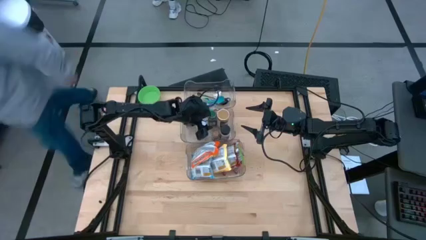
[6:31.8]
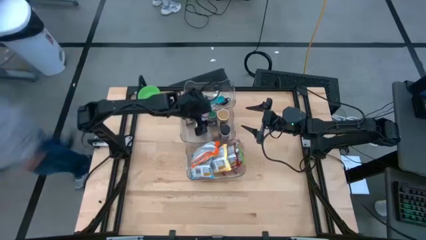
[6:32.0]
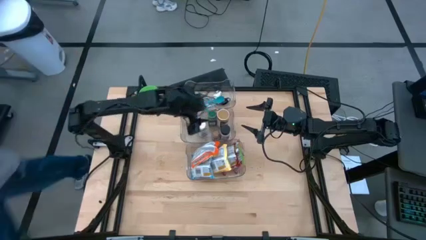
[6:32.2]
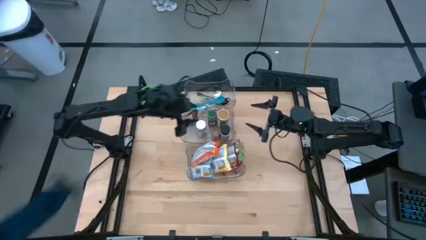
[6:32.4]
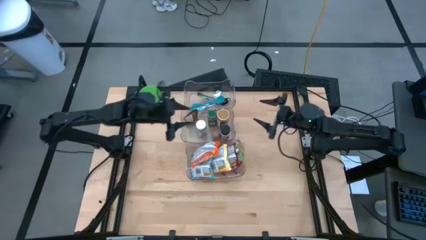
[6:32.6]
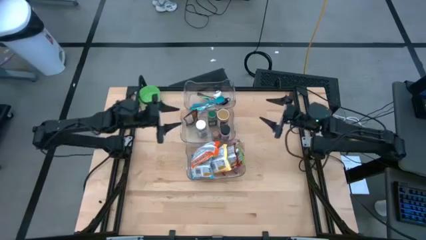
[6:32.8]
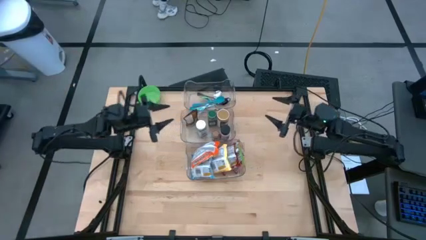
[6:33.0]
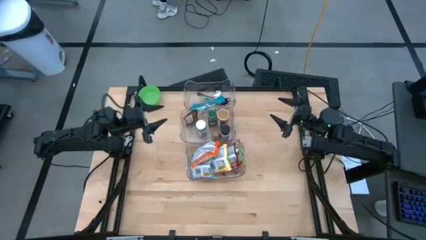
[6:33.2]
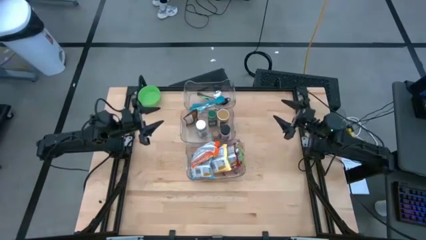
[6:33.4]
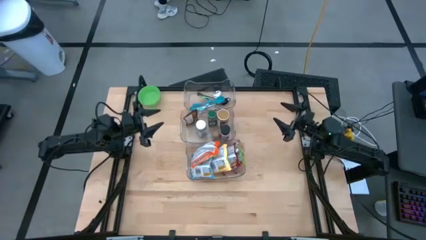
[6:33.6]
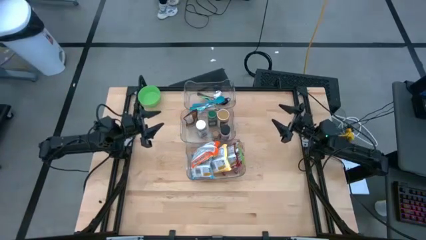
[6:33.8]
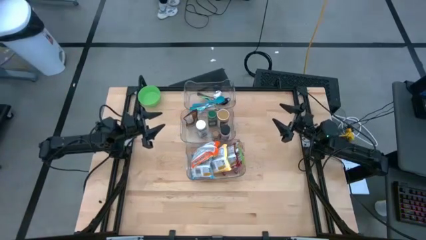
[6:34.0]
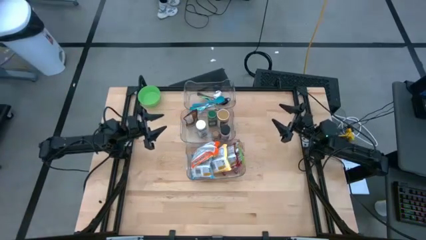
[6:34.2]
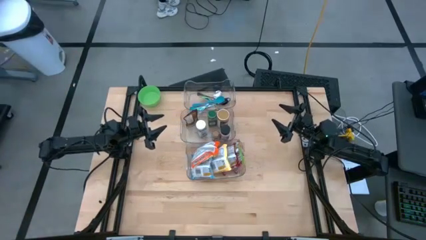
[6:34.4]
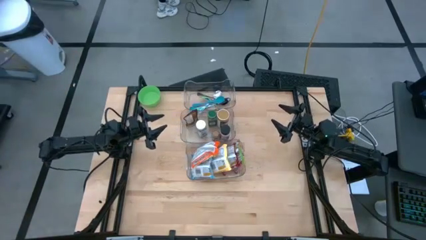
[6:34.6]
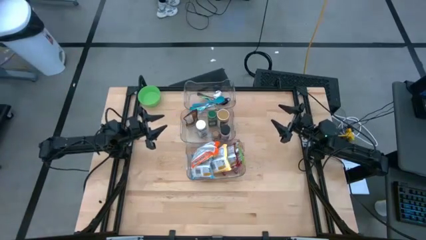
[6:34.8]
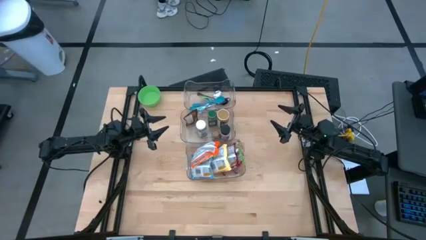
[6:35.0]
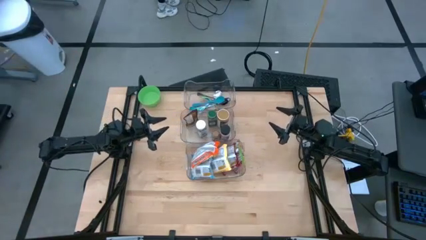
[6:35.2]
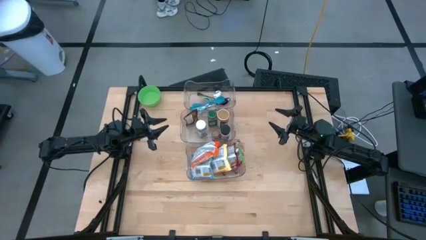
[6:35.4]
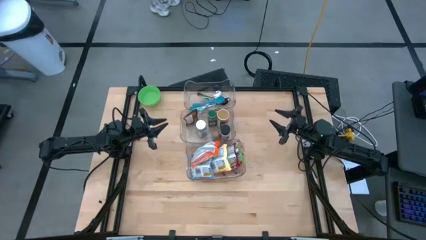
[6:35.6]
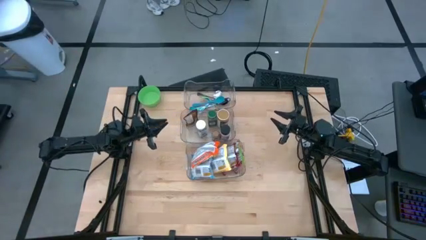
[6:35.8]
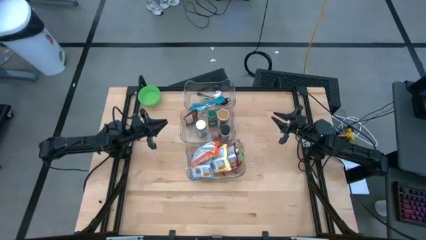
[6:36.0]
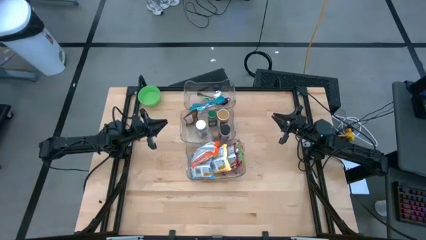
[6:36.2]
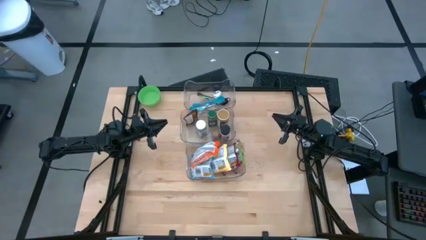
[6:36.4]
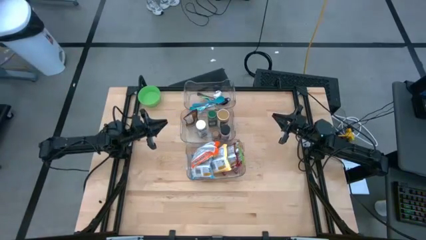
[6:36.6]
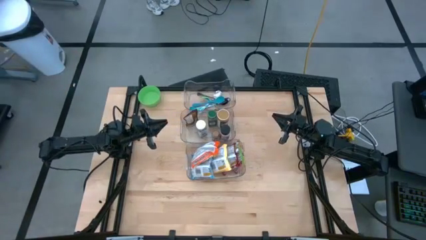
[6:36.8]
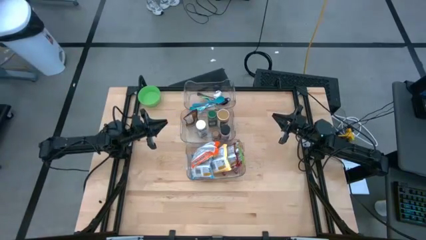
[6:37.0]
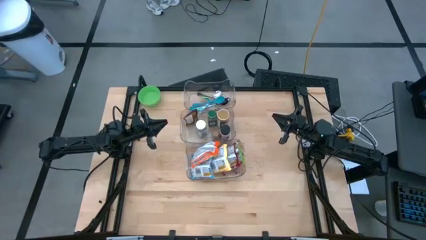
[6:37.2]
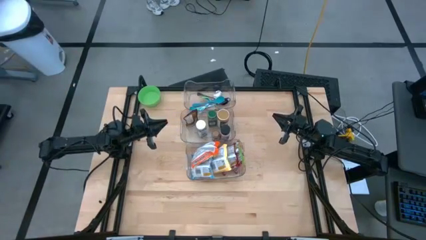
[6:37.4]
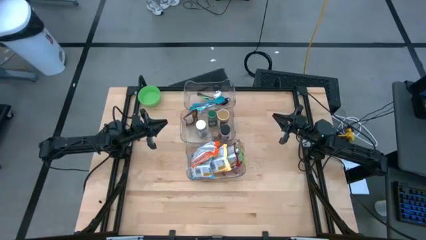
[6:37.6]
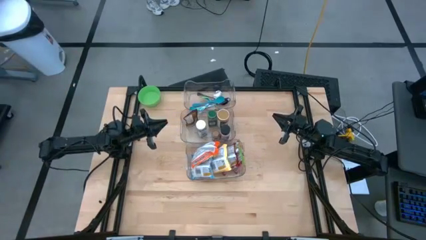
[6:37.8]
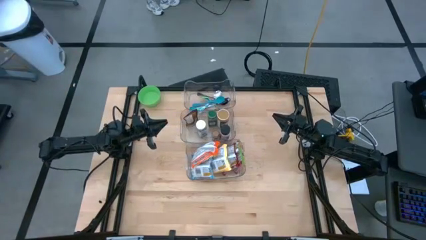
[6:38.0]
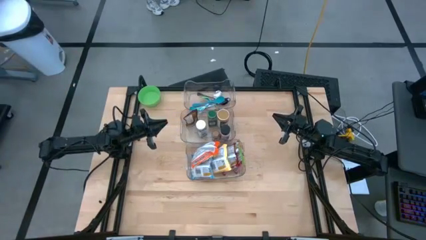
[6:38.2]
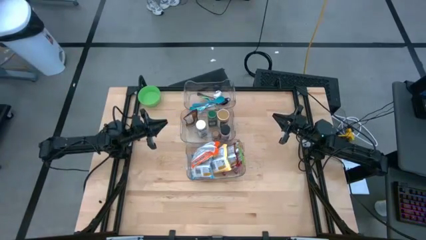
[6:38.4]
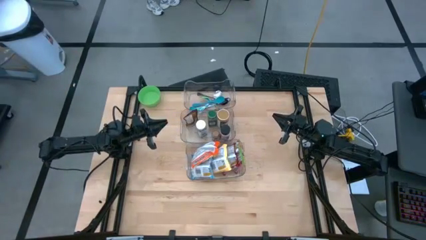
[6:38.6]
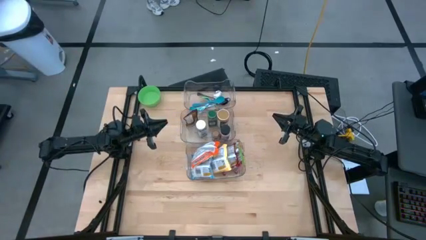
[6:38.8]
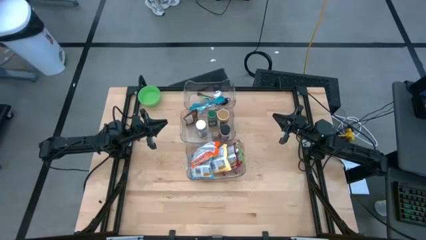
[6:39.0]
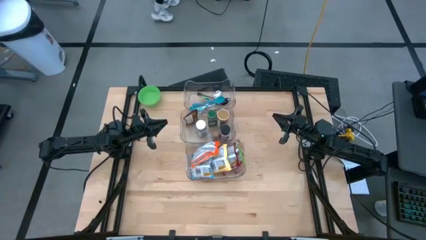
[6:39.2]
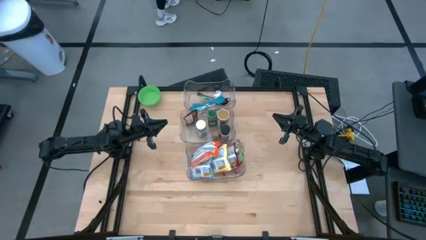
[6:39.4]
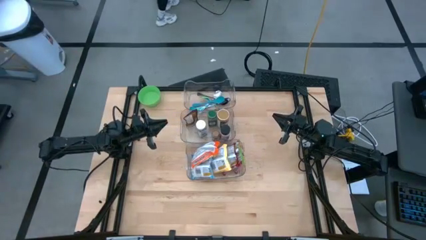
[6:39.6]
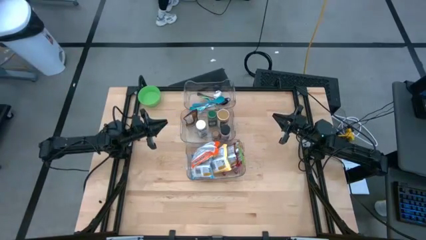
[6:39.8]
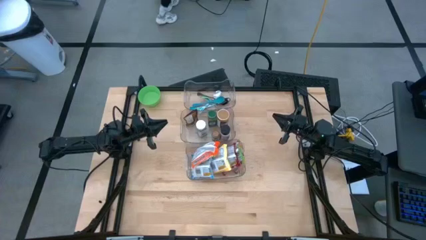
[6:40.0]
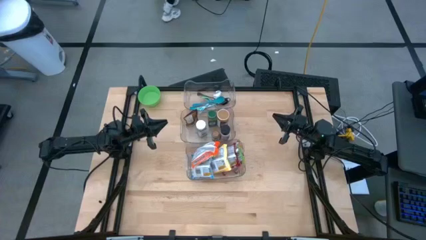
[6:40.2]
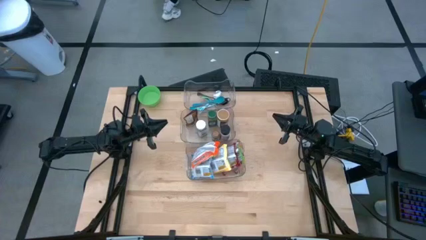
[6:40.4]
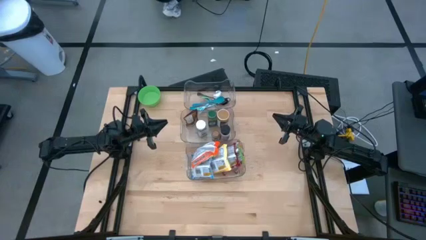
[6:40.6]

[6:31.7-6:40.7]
Task: Pick & Place Food Item
Return to Home Position

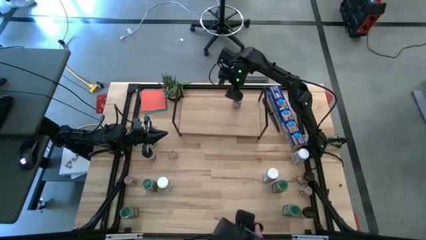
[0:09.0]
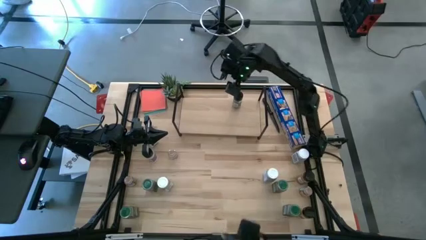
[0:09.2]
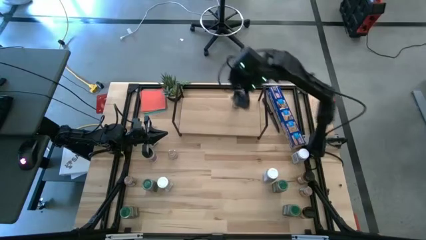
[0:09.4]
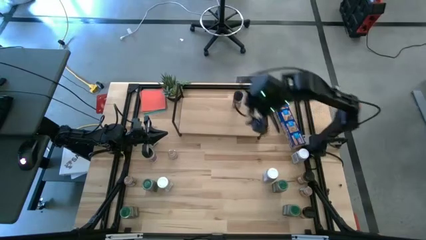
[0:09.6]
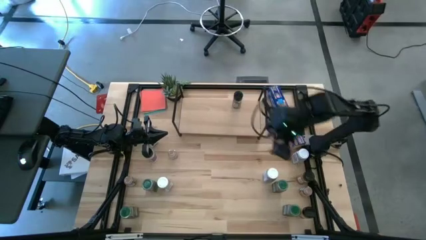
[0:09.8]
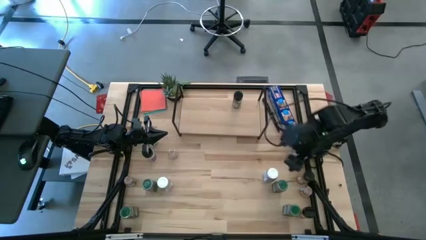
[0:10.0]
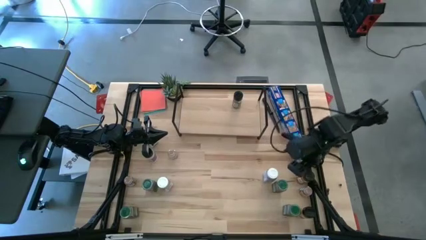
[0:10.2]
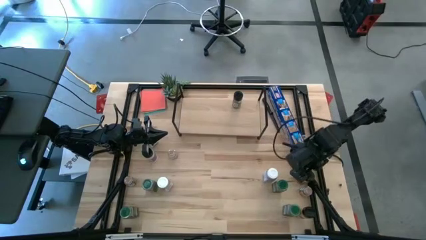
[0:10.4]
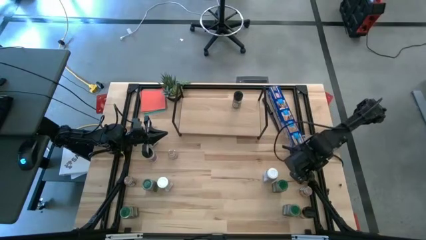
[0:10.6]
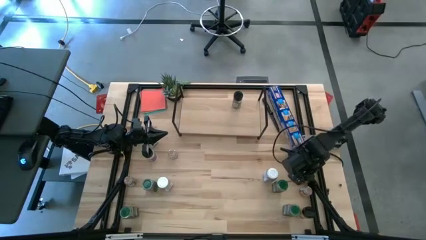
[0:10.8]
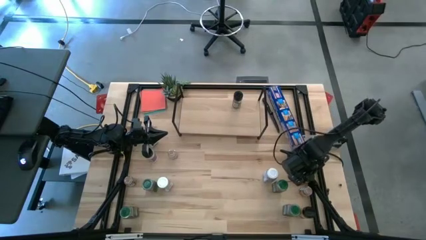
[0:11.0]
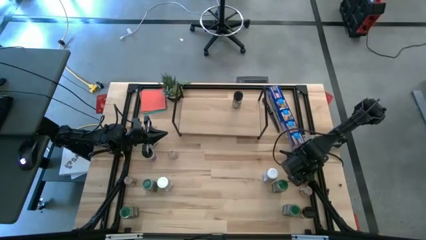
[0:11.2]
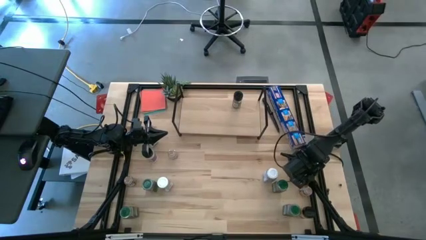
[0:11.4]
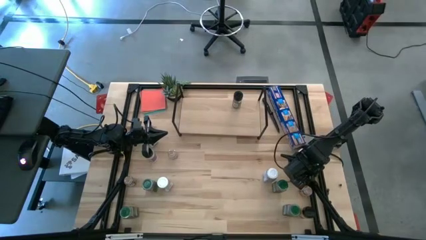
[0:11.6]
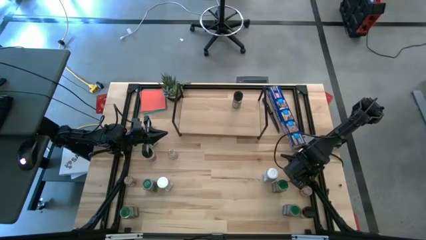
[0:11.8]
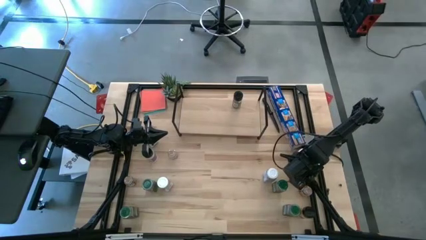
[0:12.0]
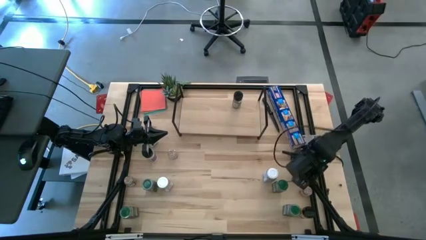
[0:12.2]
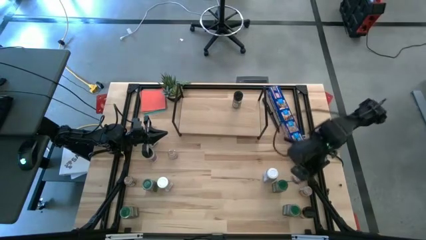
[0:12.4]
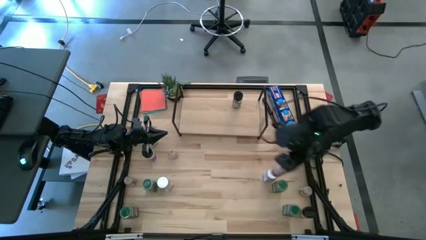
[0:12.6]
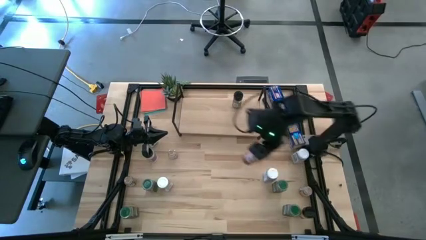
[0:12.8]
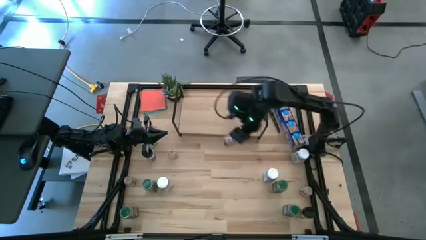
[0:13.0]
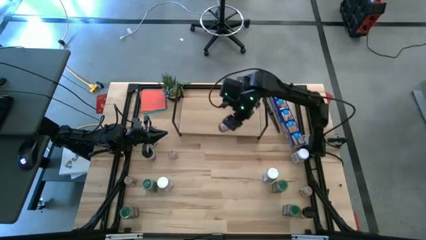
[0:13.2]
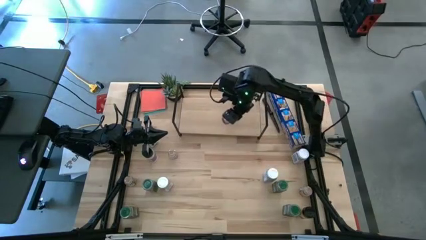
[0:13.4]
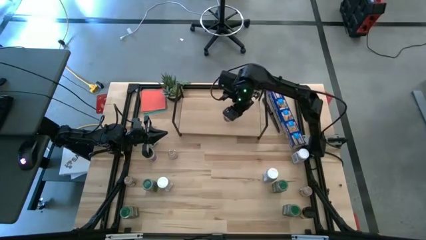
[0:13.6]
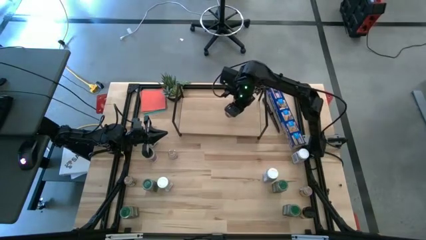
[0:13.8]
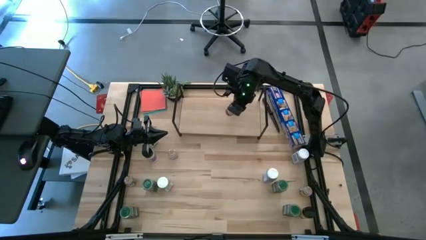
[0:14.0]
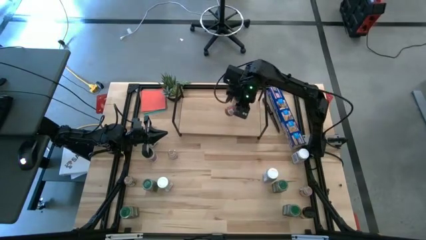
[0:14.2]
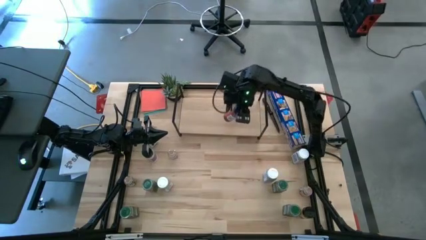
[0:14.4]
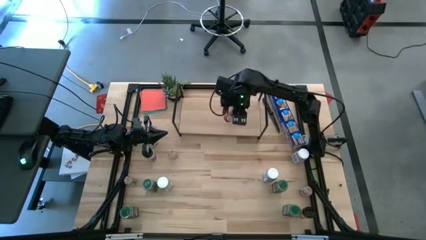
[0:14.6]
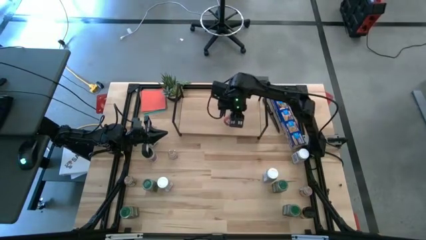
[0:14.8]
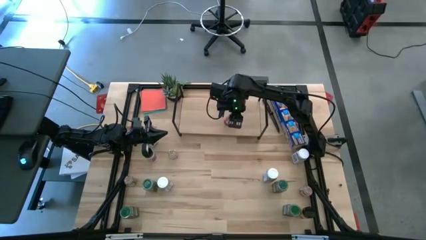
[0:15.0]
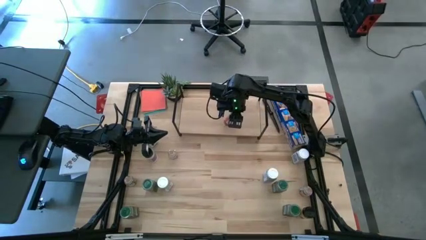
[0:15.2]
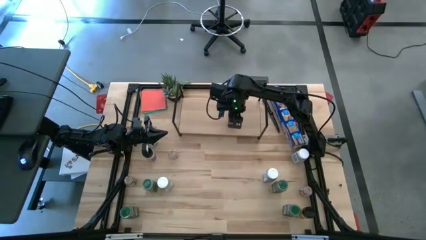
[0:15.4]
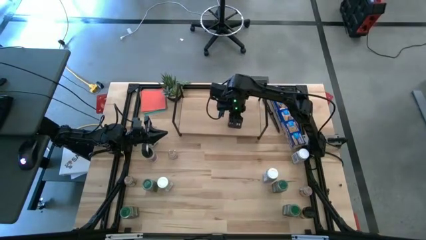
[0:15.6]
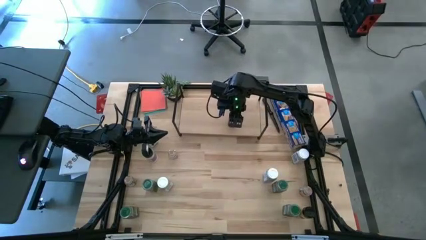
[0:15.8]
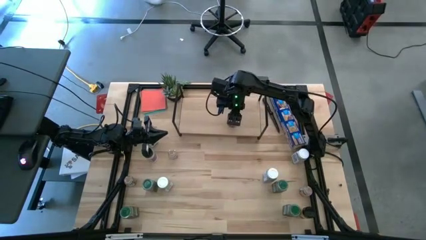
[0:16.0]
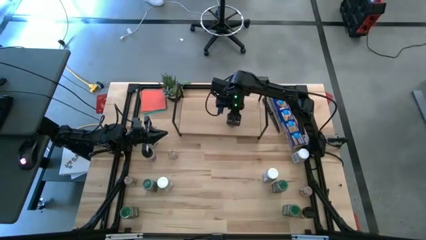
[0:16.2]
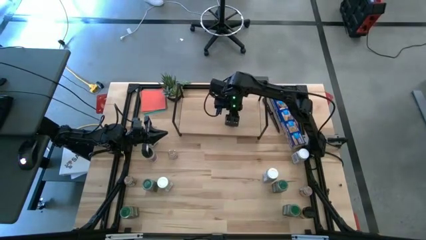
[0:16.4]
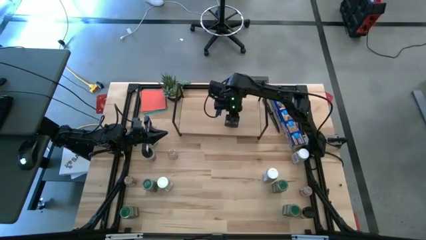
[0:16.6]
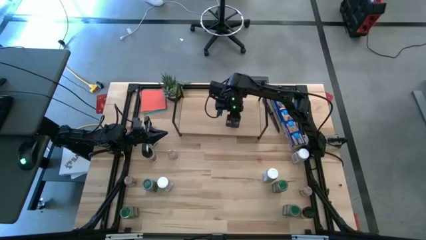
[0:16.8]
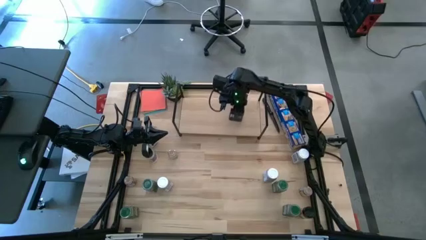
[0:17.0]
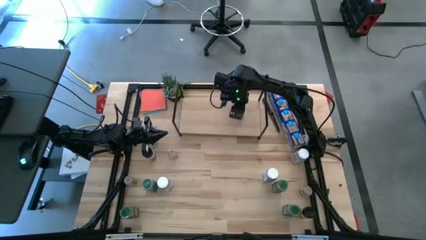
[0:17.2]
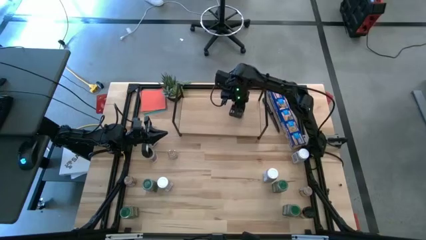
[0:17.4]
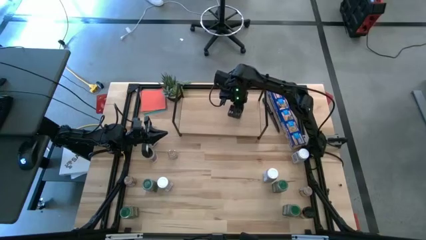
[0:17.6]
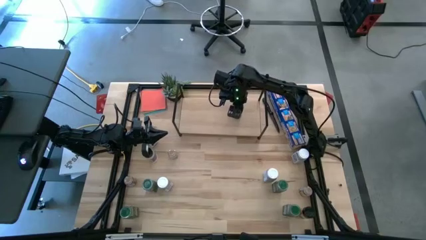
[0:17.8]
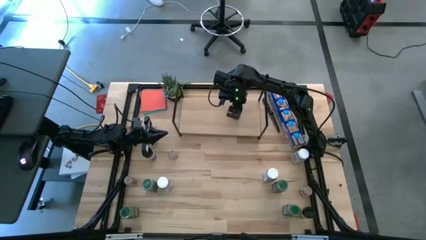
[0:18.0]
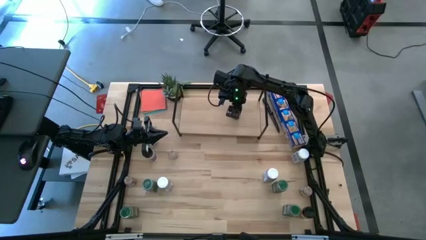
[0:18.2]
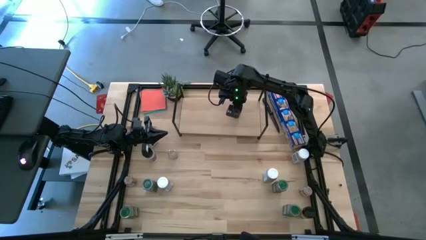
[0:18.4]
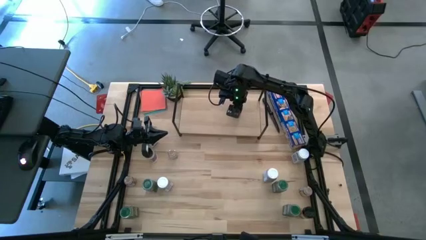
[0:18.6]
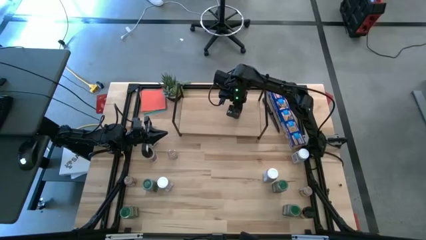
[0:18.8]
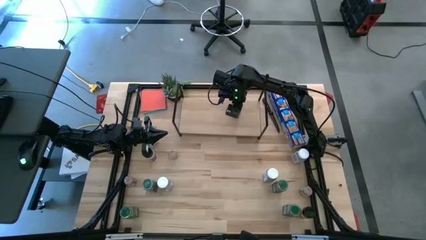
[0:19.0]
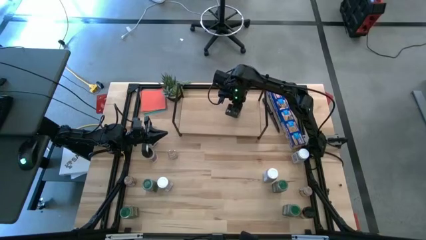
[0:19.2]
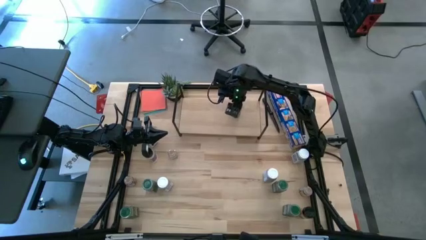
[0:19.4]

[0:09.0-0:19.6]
Task: Shelf spices
Put the black seasoning bottle on the shelf aligned with the other black seasoning bottles
